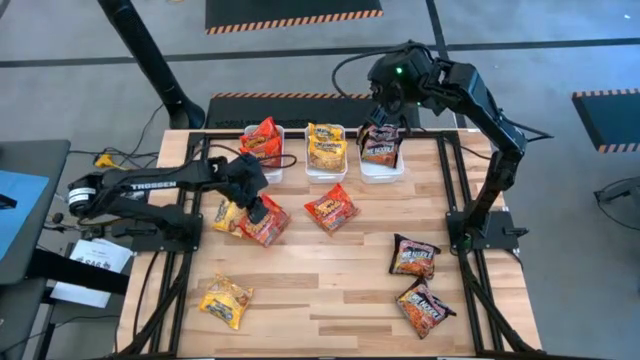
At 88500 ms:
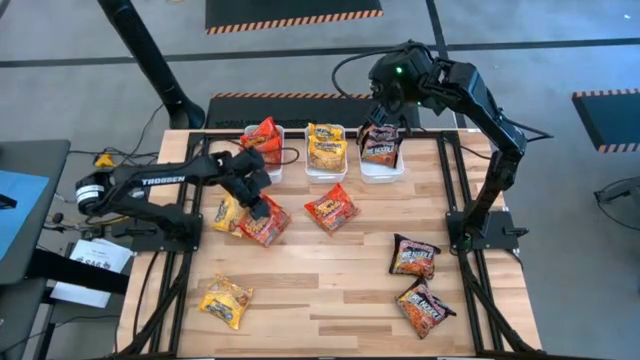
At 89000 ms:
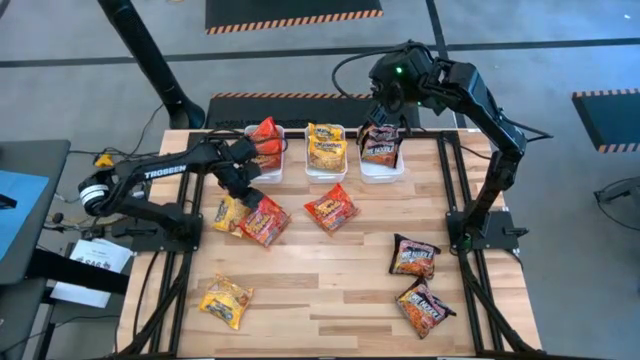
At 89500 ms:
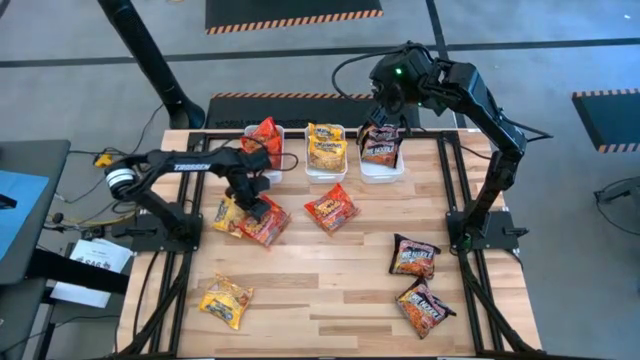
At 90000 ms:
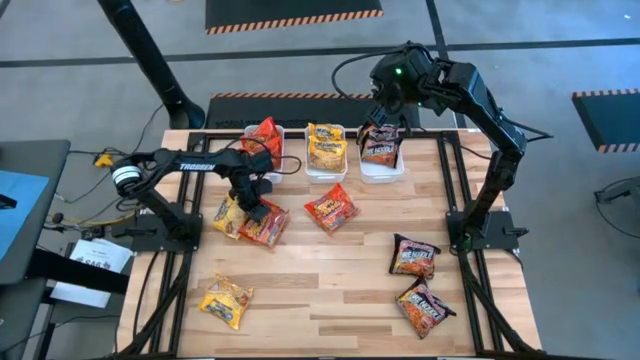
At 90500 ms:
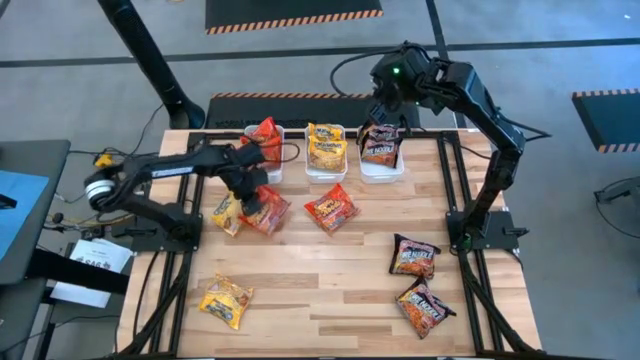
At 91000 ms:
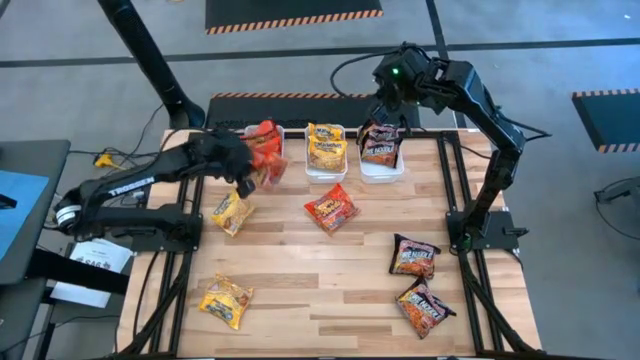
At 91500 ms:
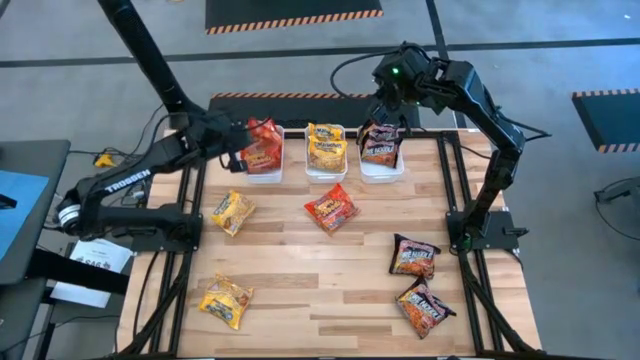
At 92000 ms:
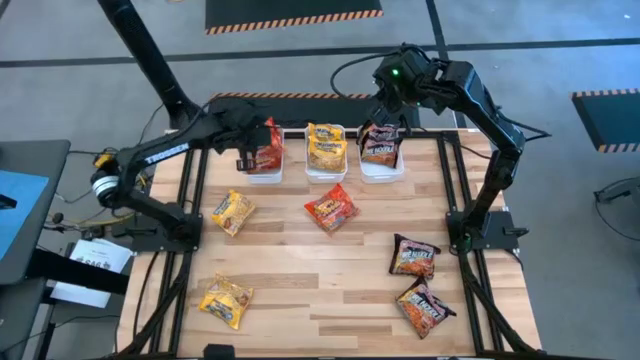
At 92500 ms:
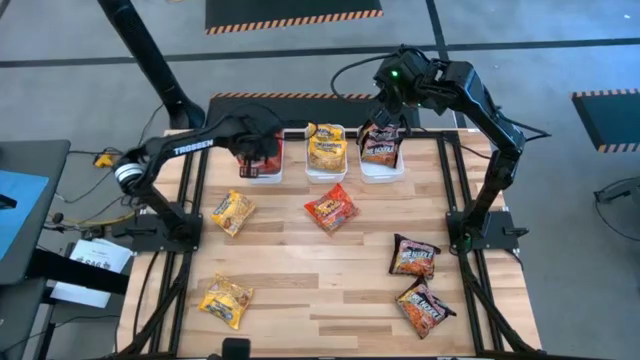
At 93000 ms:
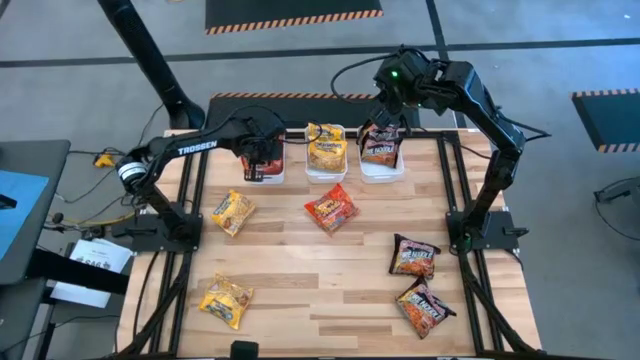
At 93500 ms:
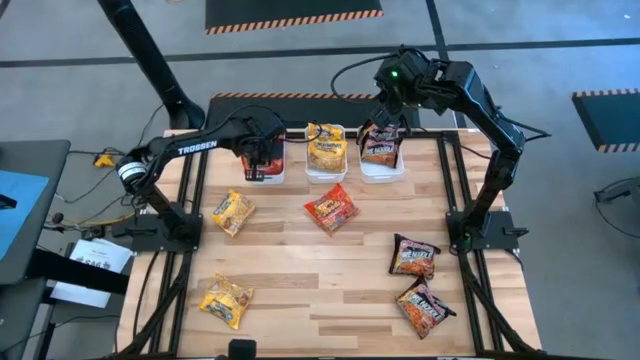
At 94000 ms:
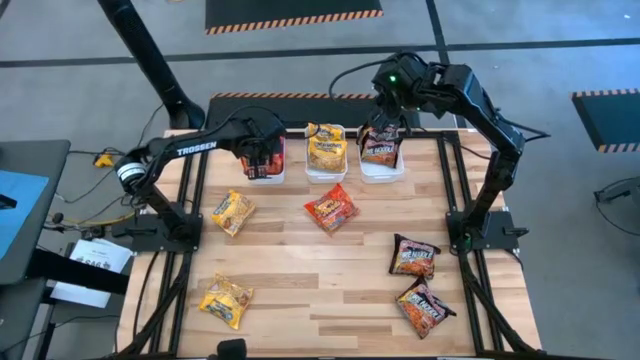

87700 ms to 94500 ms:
Task: Sort Maruchan noodles
Put the orange noodle pack into the left white bin

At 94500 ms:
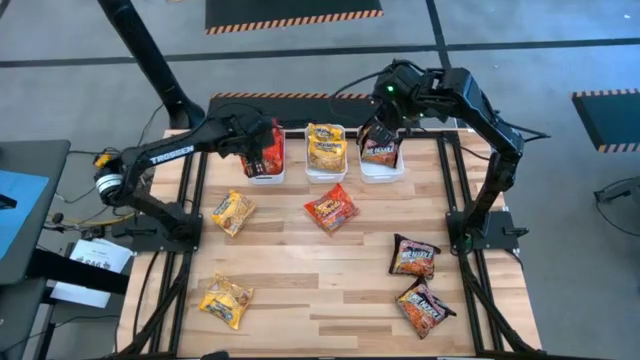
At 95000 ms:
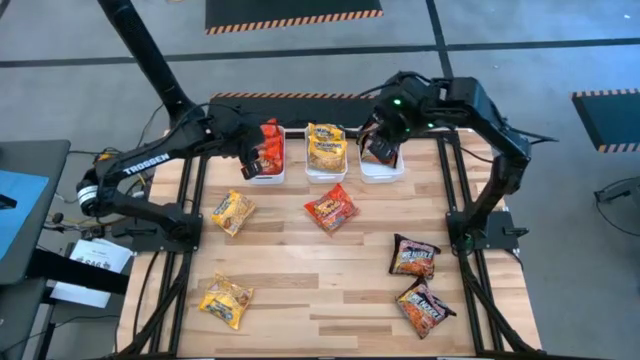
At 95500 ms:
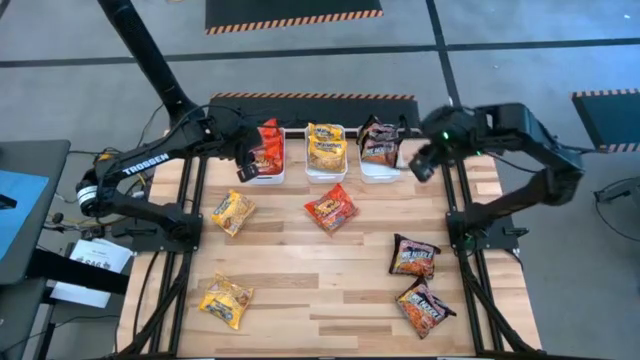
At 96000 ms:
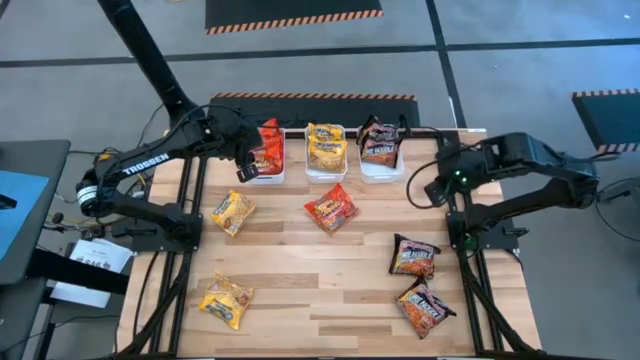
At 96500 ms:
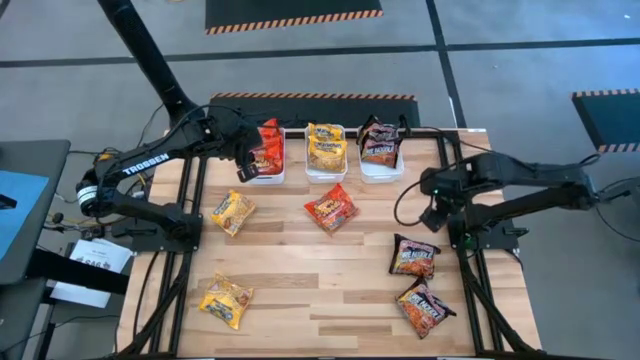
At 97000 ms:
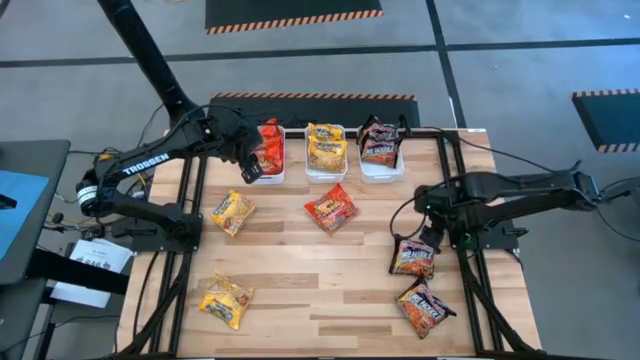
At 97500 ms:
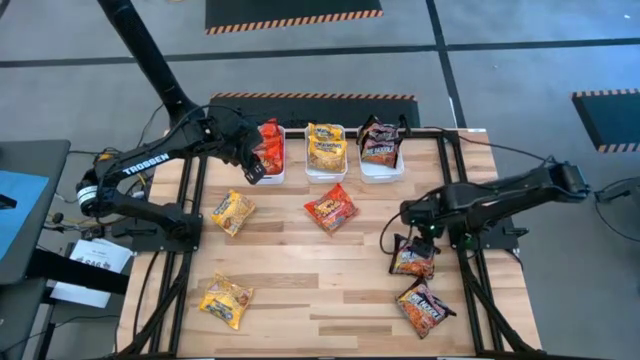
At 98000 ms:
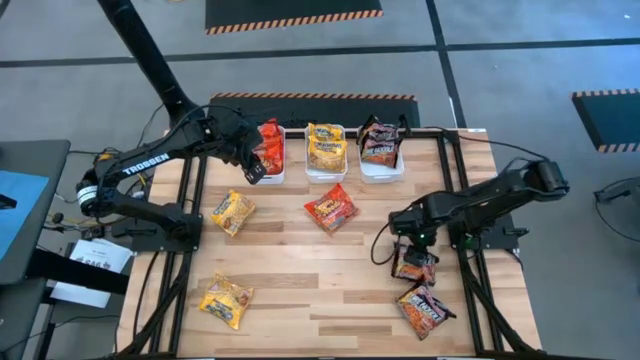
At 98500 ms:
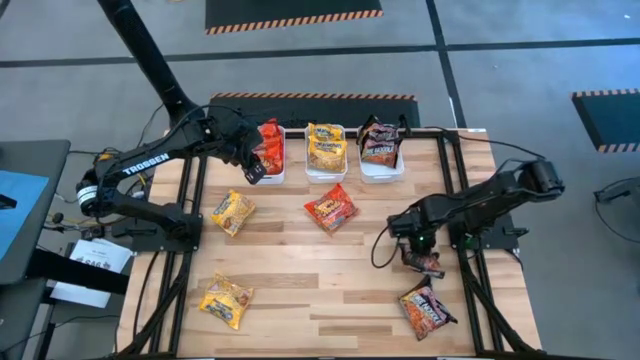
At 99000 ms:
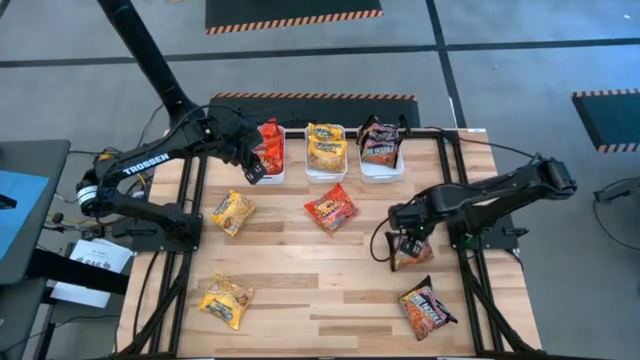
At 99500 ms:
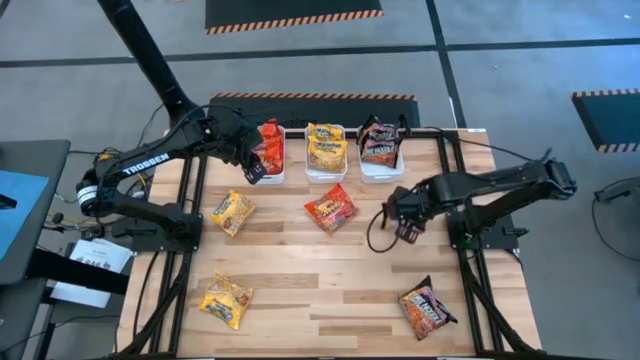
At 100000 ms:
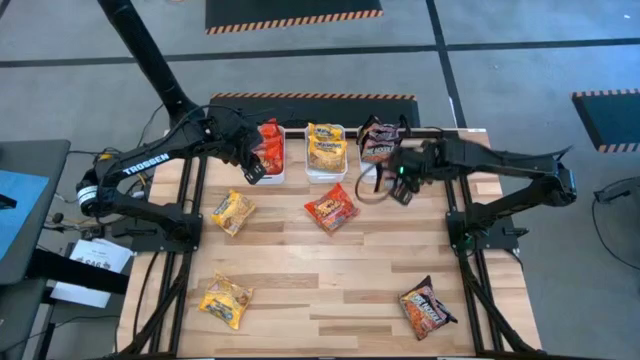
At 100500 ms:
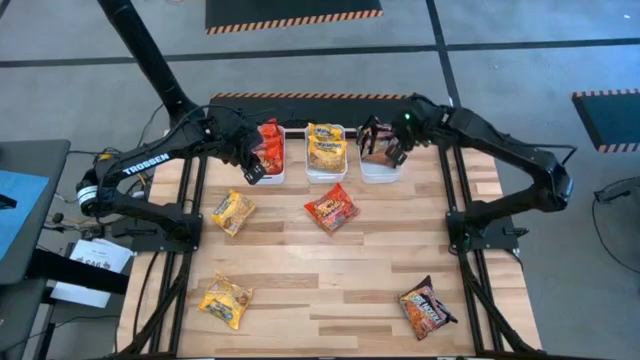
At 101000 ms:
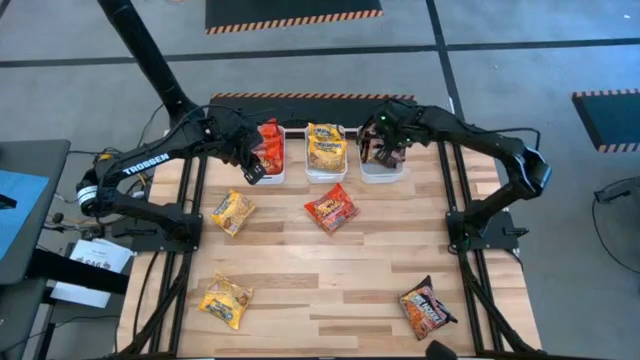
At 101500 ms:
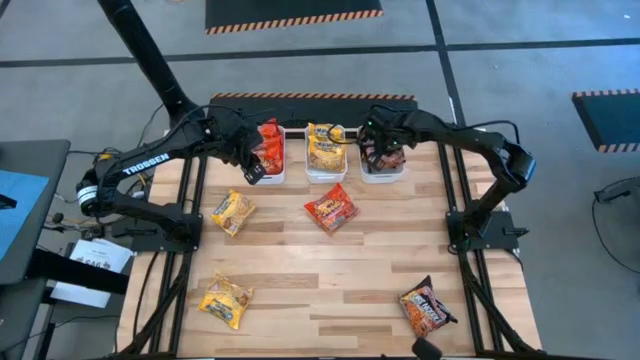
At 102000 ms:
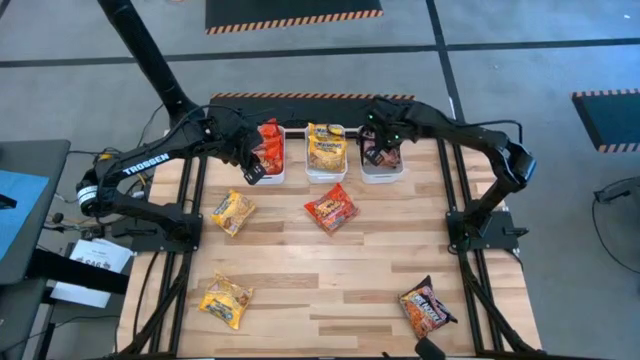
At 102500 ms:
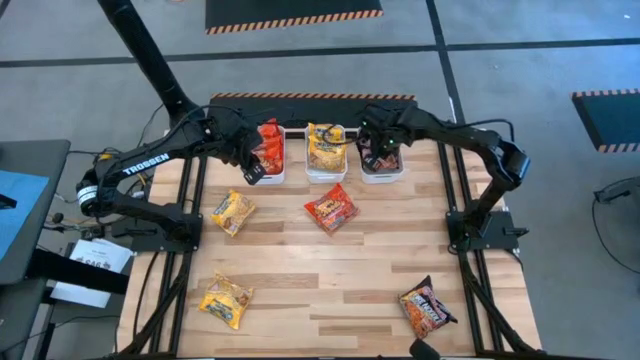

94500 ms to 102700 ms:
Put the black noodle pack into the right white bin

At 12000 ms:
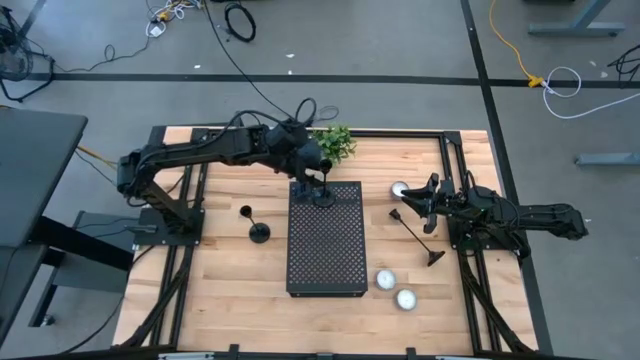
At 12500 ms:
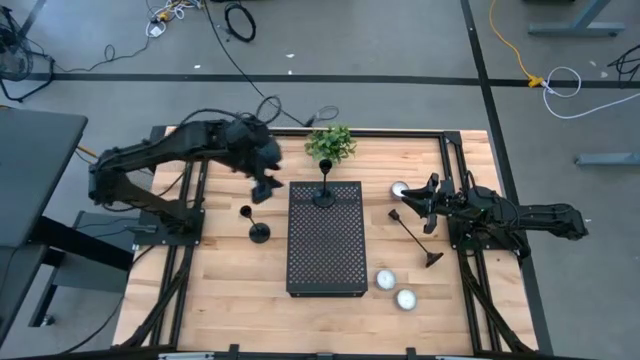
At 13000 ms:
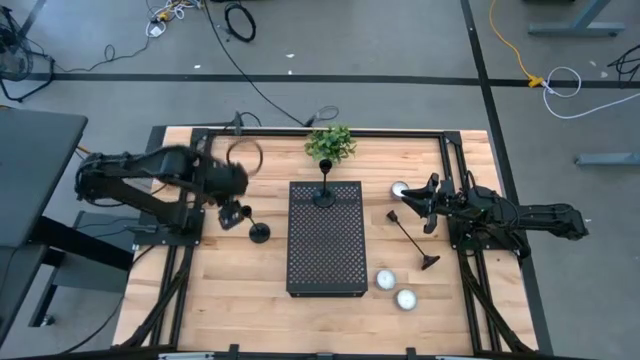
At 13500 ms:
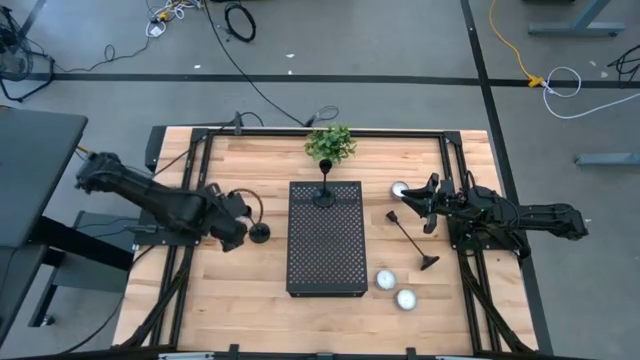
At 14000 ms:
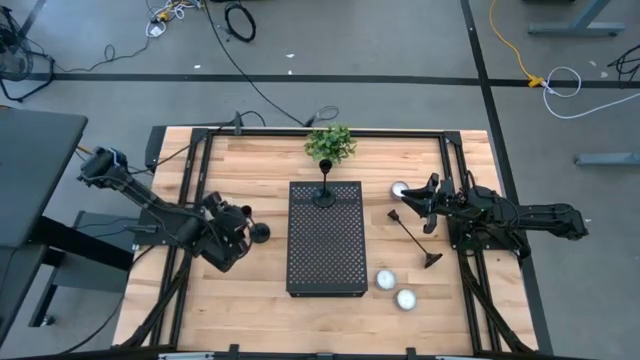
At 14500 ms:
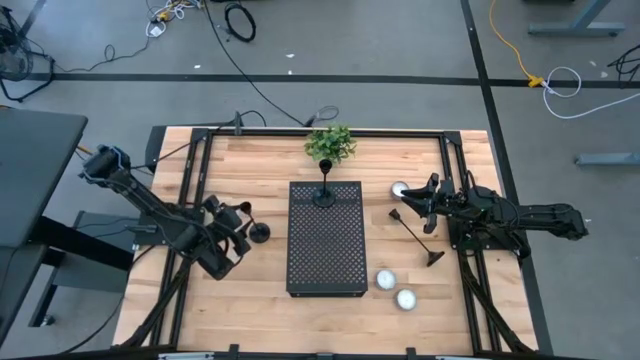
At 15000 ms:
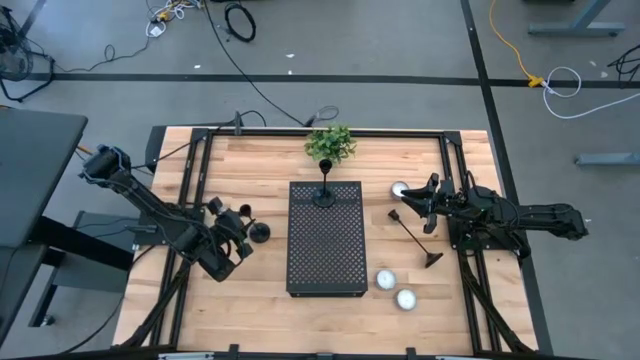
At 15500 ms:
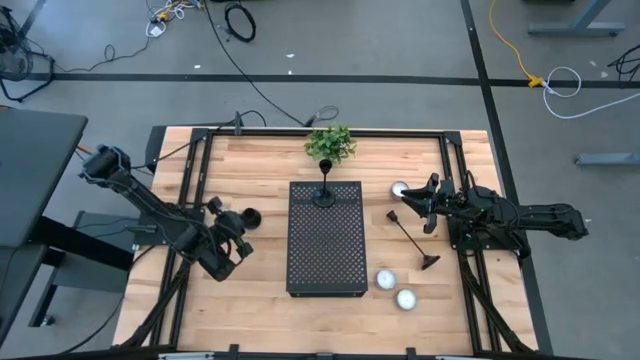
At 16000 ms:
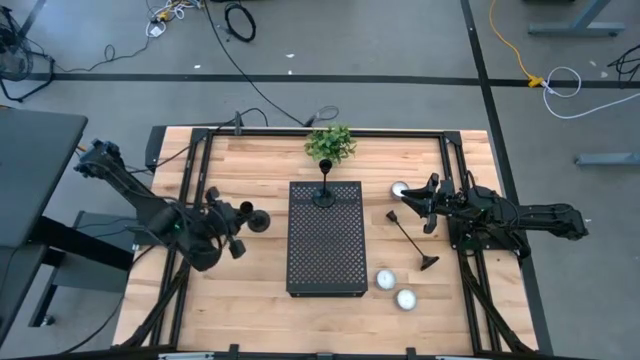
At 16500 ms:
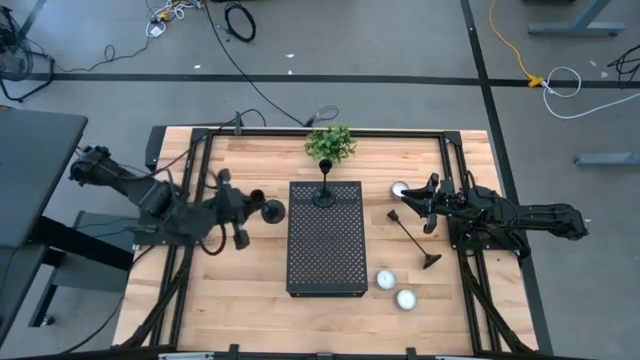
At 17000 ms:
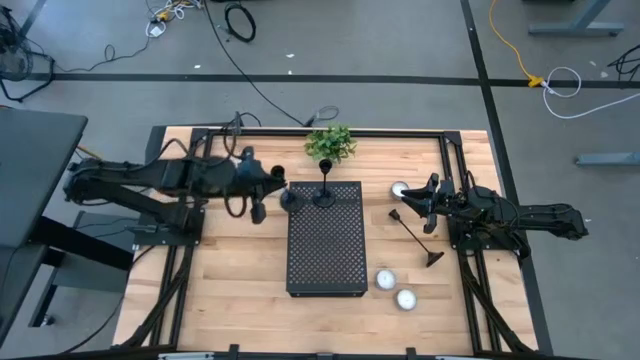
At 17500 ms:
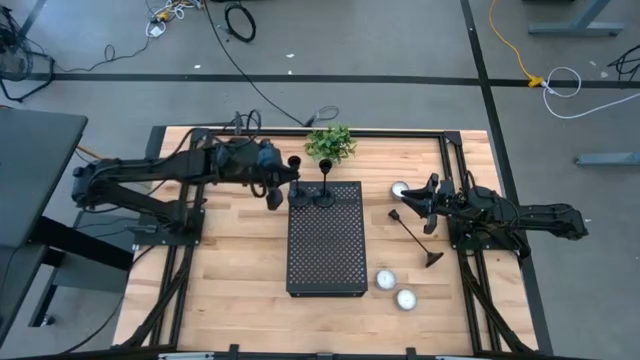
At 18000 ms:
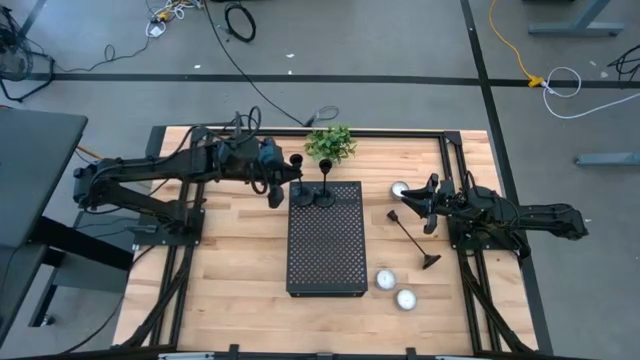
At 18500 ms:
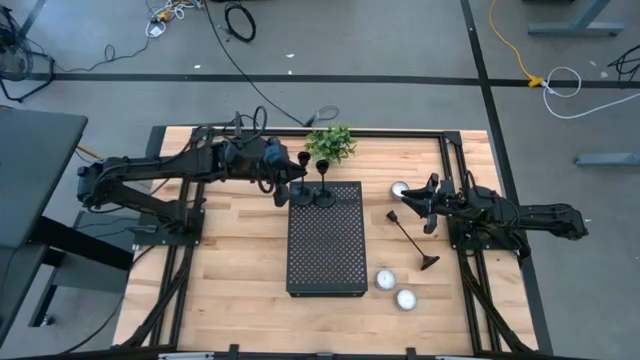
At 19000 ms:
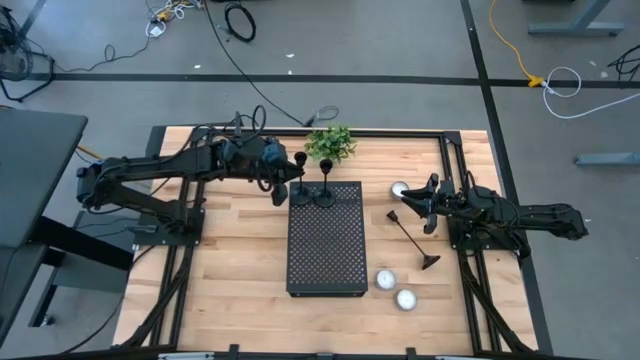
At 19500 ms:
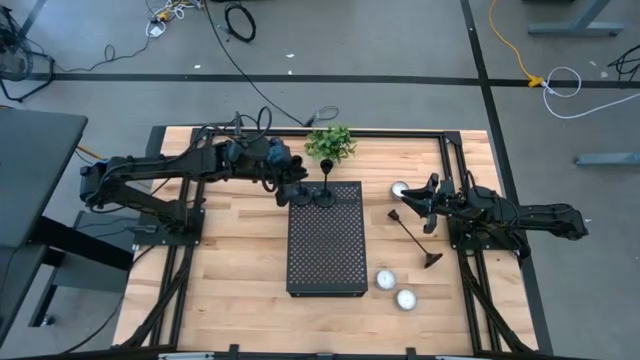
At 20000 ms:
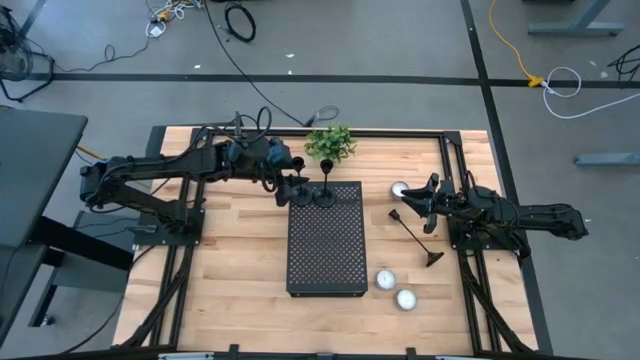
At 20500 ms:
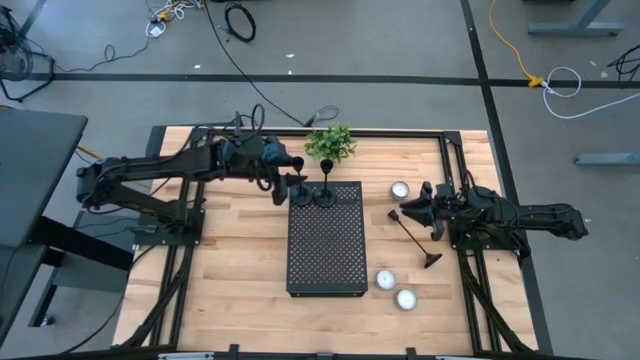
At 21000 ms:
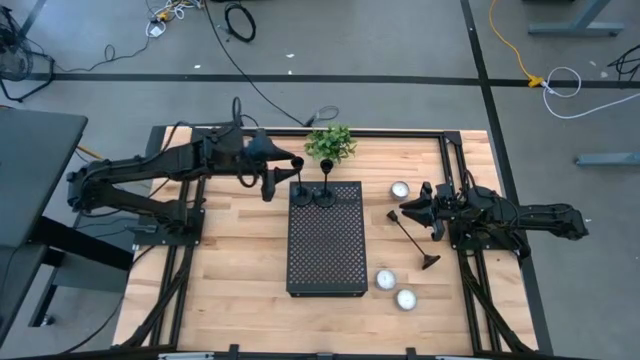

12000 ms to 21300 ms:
Task: Pick & Place candle stick holders
Put the left black candle holder on the shelf
